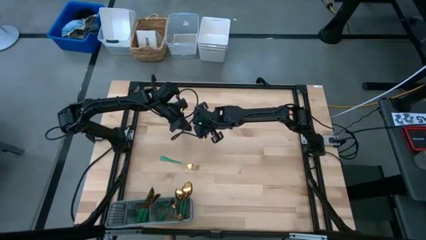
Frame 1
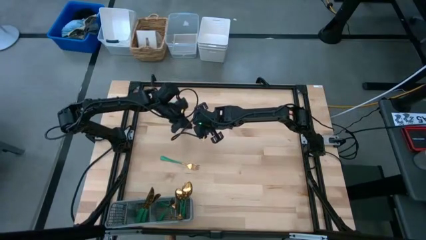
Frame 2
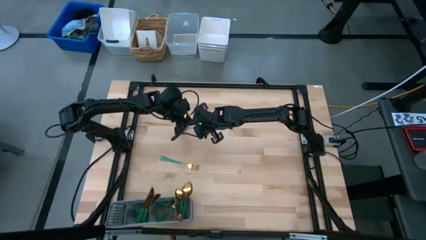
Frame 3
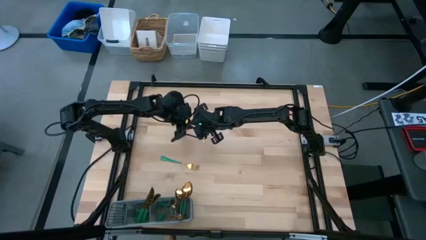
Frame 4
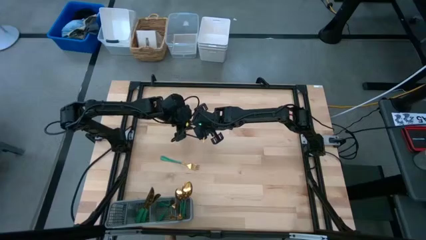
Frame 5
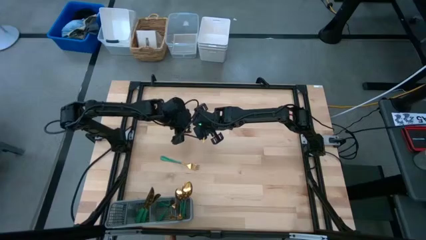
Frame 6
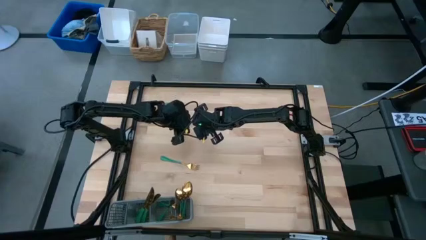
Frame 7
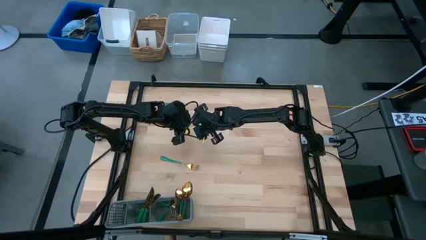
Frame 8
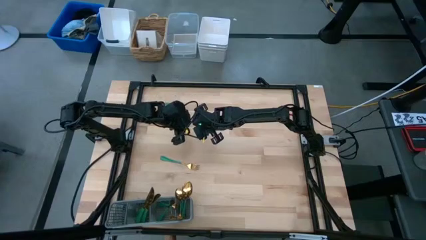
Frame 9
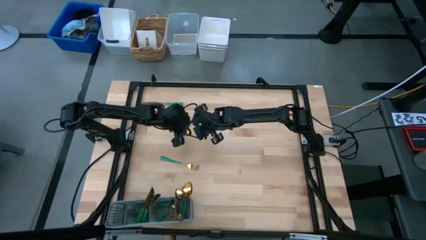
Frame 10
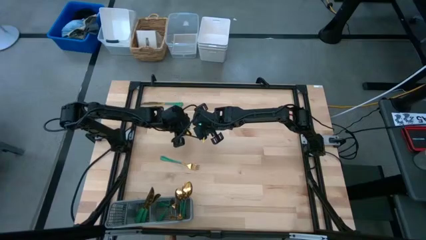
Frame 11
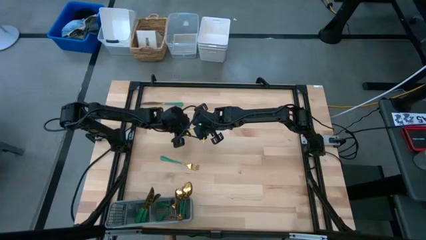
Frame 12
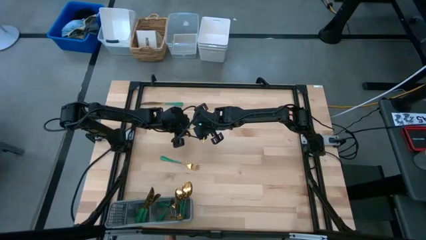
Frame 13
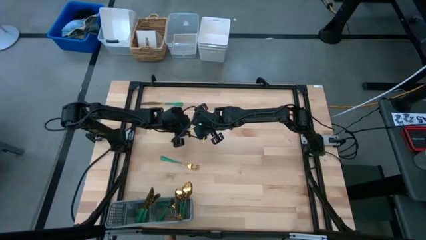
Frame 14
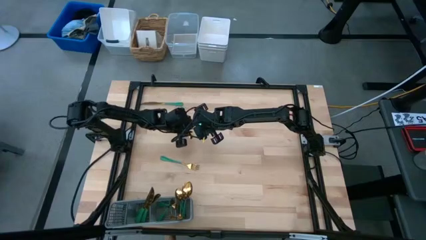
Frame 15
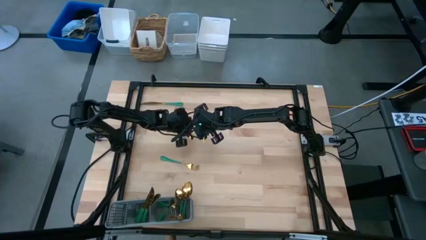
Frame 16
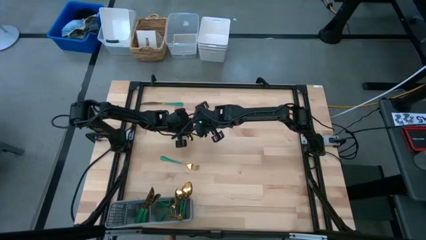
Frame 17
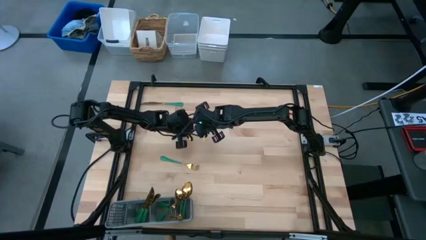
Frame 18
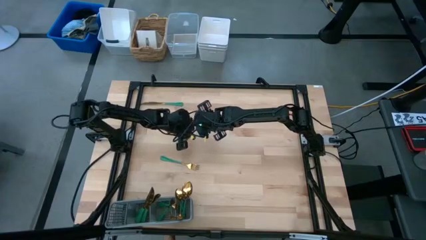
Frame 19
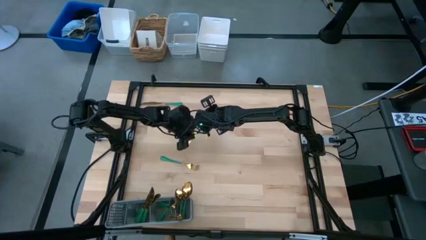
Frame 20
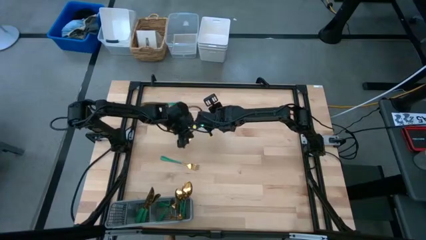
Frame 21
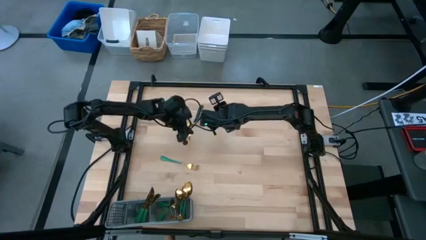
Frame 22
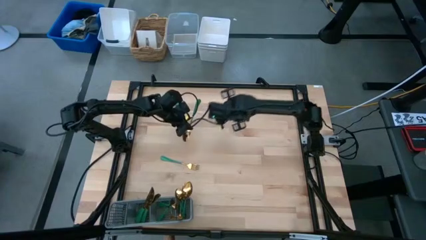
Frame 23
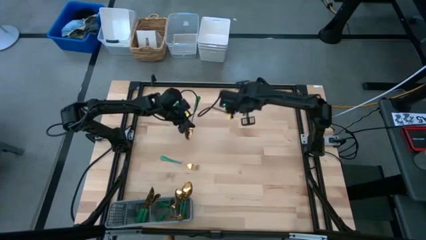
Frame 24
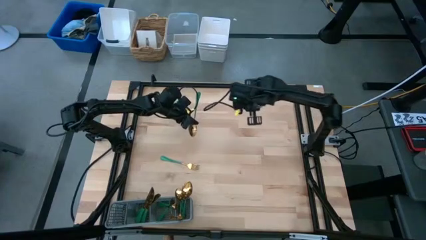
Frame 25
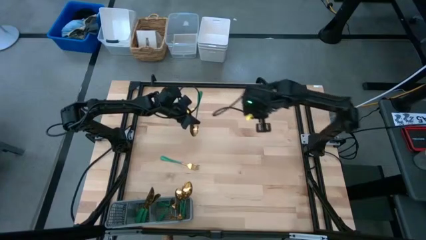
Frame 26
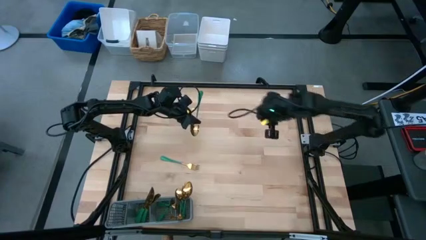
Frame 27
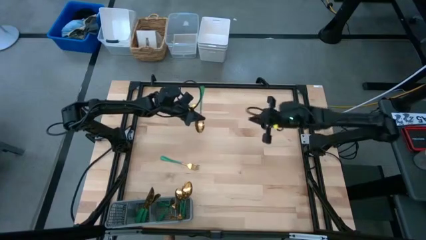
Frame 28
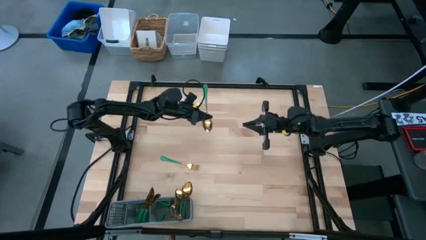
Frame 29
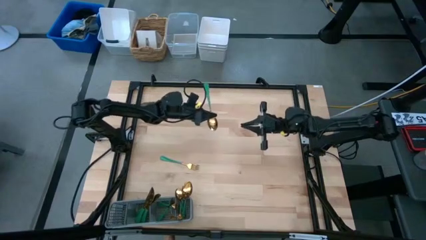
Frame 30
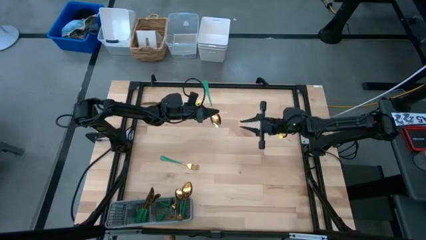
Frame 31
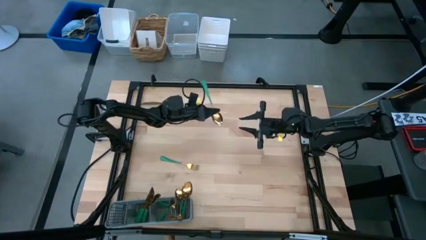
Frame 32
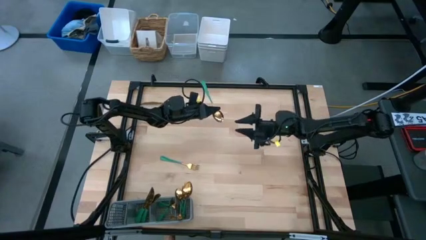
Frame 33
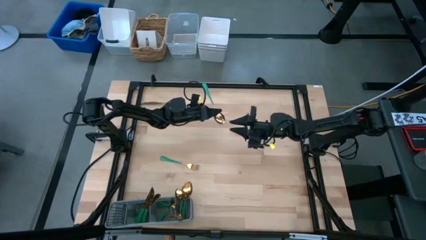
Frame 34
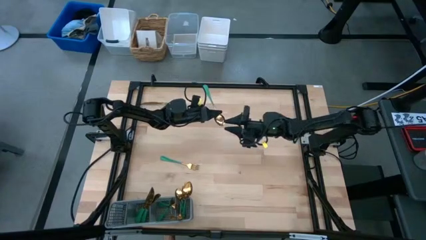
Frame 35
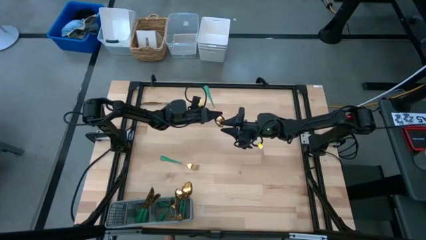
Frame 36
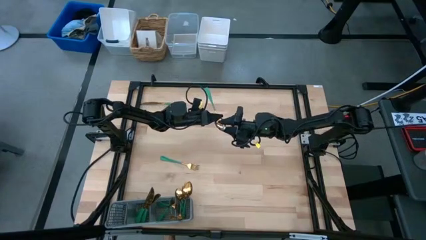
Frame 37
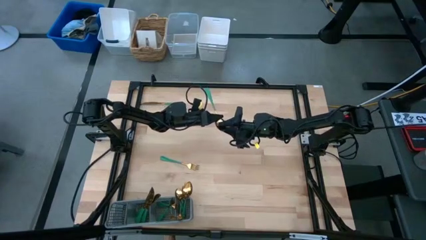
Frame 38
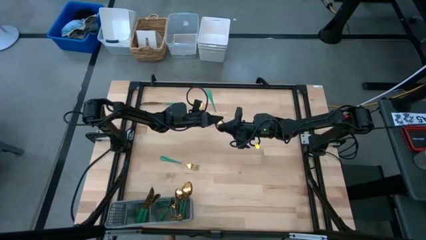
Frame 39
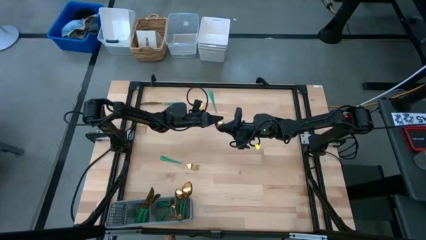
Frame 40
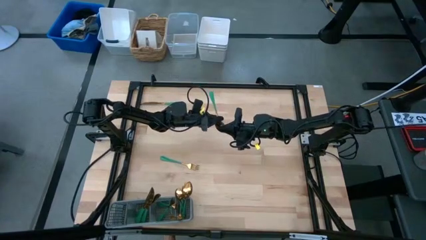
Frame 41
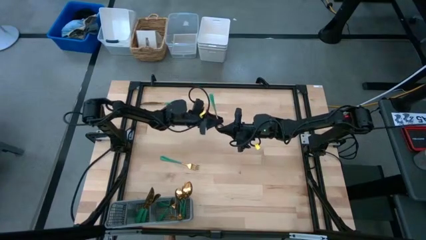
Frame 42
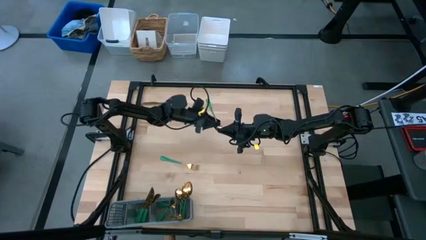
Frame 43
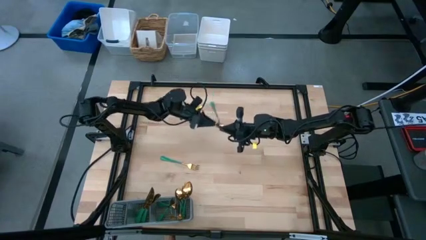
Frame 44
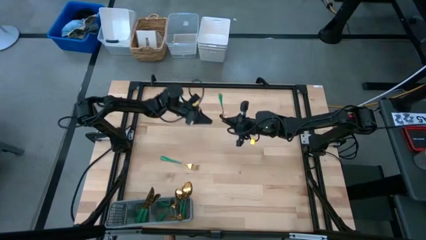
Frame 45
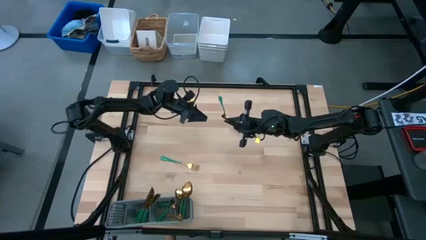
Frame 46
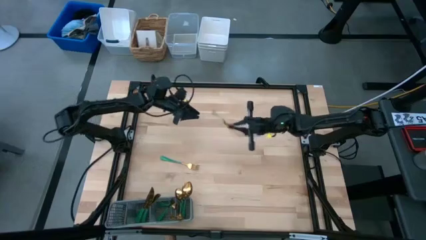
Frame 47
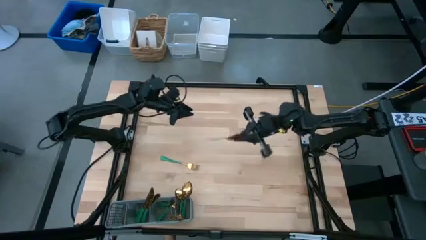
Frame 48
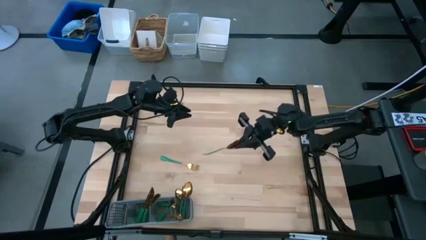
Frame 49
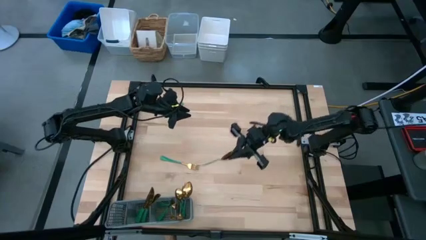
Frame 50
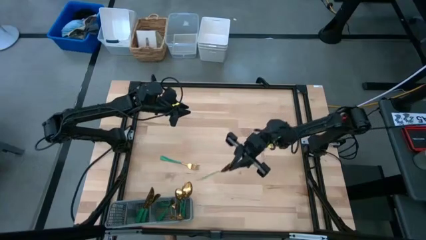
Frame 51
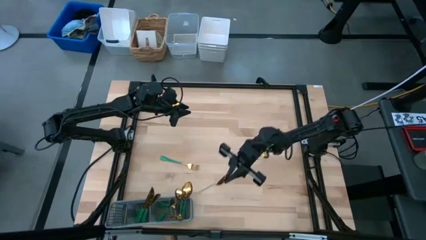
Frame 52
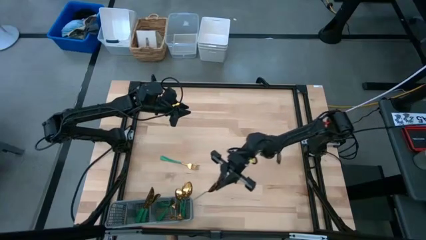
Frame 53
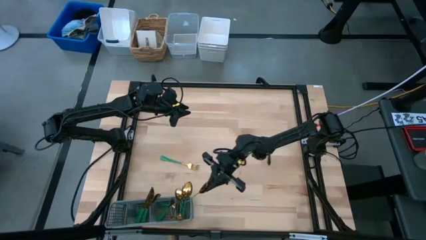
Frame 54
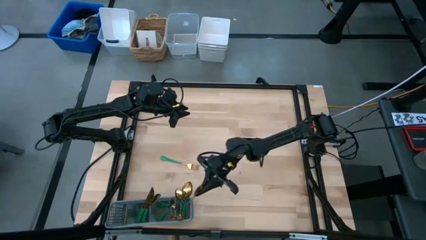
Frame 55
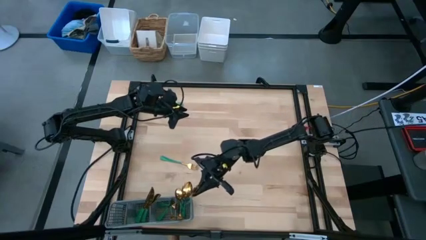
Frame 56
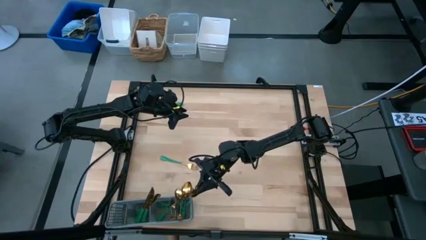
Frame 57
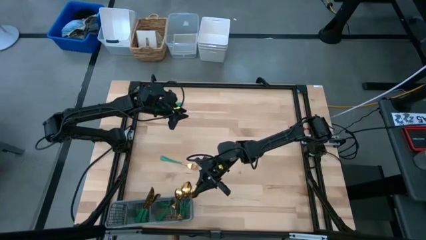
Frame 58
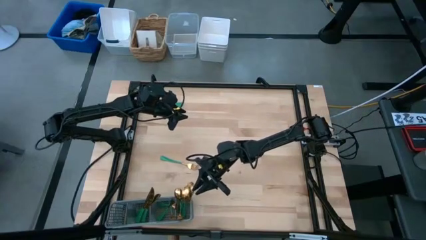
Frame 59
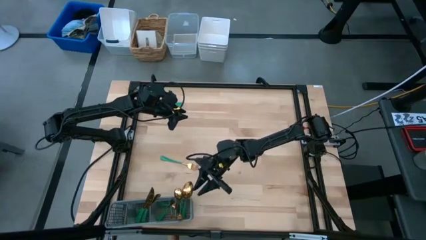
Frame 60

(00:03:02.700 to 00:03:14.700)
Task: Sort silverware
Put the spoon into the cutlery rack

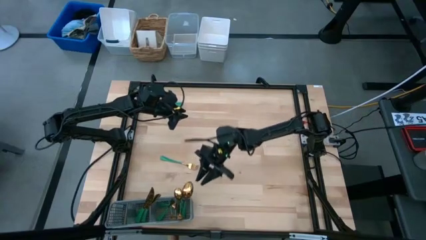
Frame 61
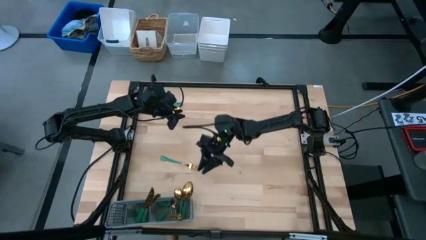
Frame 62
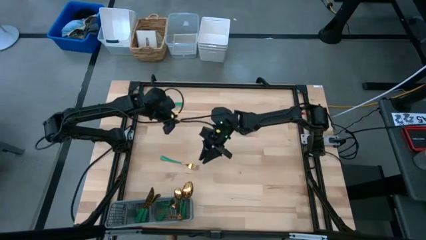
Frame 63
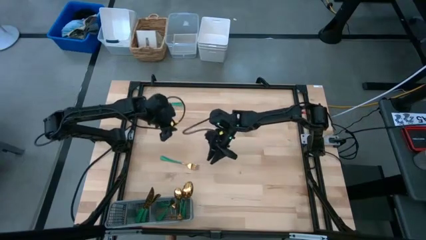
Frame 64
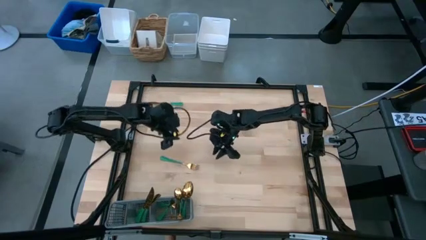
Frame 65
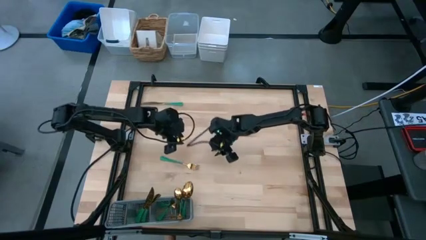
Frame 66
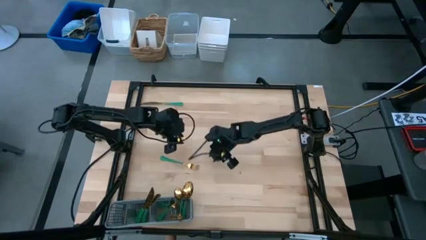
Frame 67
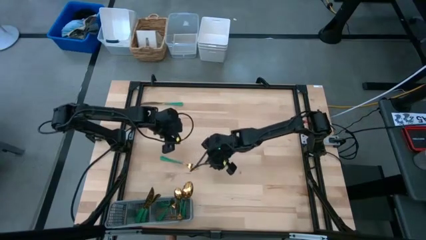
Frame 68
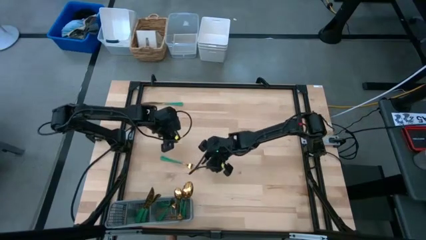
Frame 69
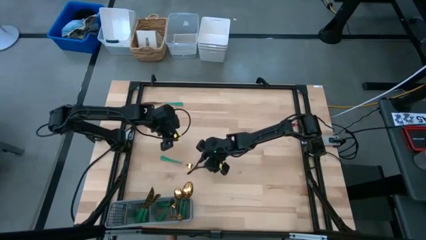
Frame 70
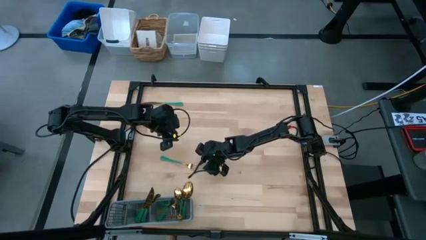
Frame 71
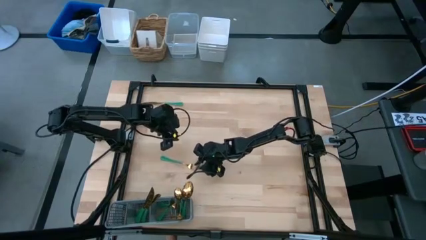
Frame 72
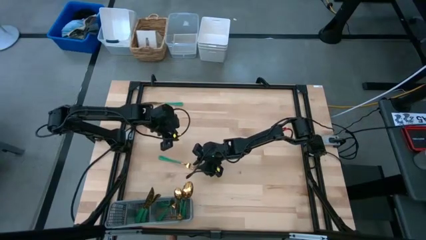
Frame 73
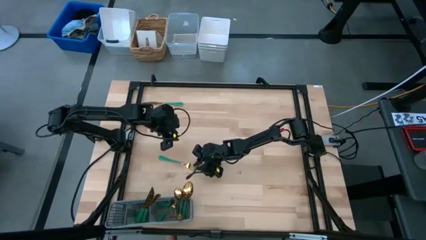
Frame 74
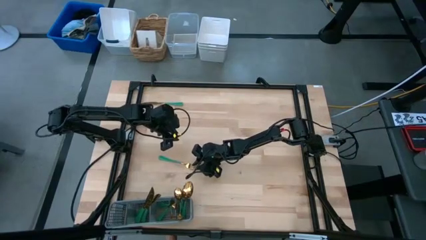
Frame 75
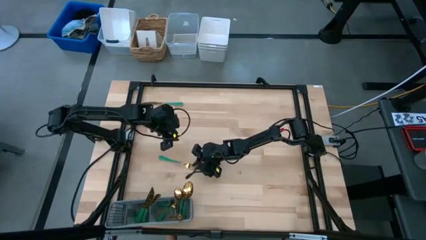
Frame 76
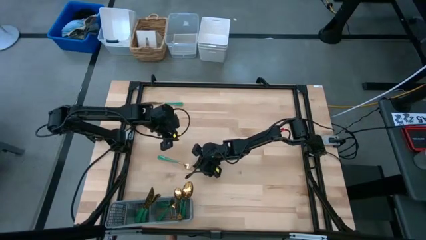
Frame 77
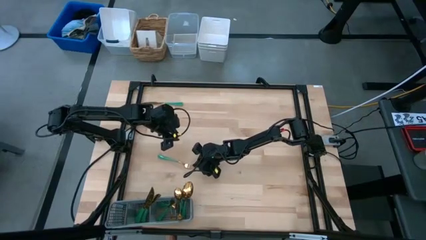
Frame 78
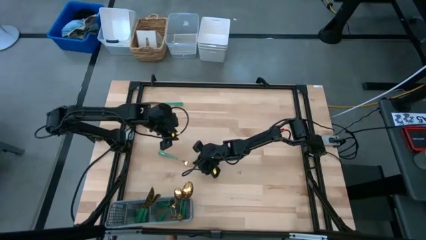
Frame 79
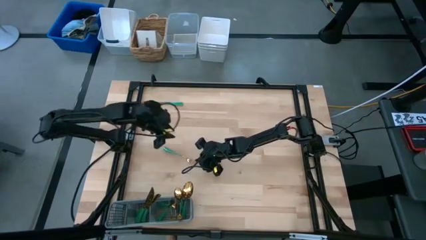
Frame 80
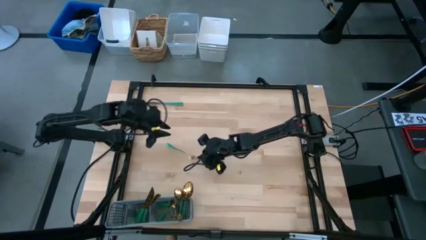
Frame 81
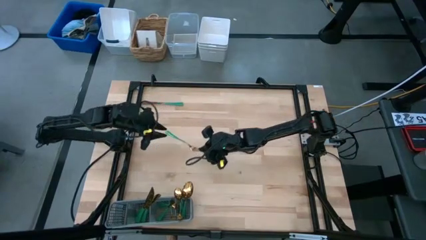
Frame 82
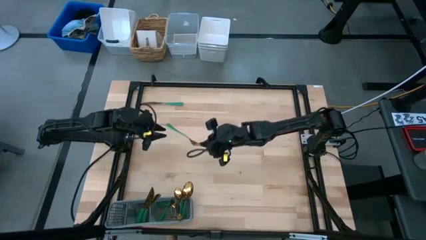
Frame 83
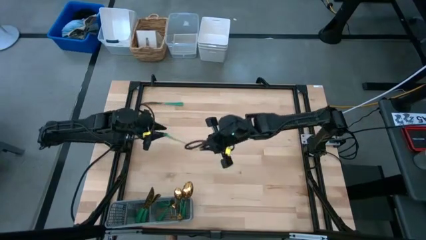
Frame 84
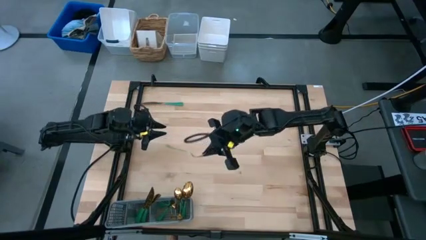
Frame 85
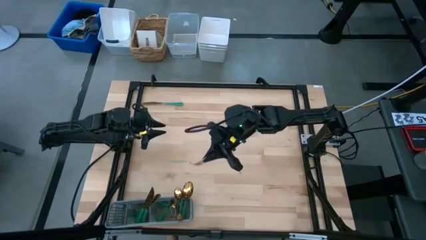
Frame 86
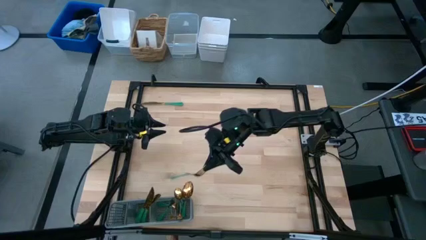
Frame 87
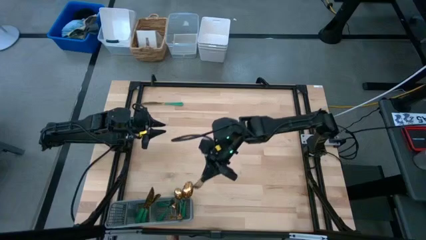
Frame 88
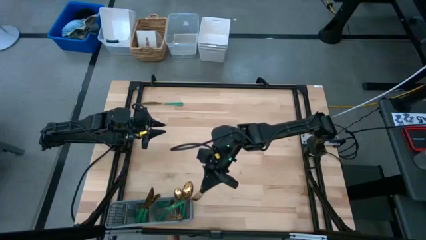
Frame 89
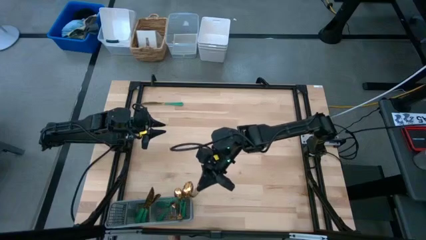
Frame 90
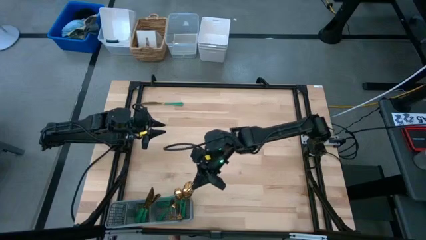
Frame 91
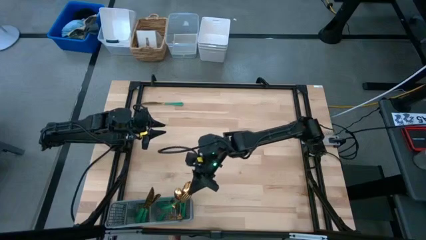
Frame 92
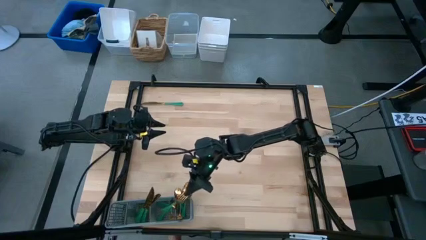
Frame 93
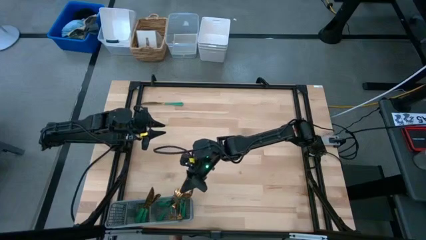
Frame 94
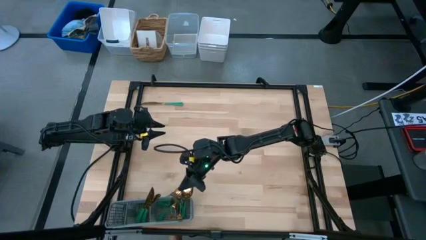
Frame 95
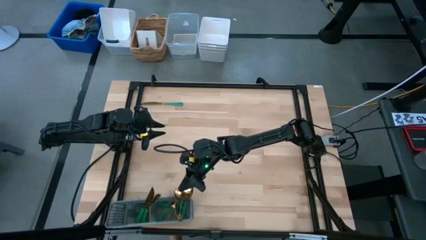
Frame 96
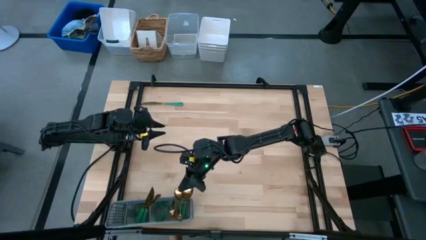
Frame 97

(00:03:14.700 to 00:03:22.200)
Put the fork into the cutlery rack
